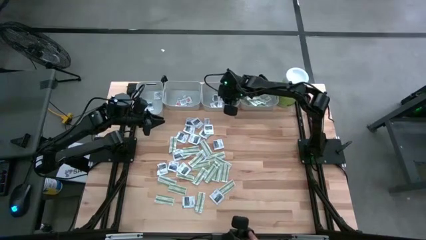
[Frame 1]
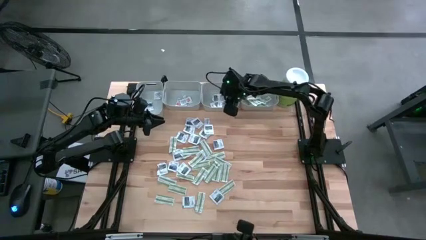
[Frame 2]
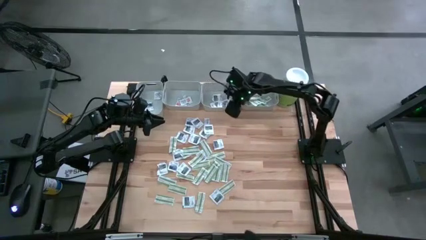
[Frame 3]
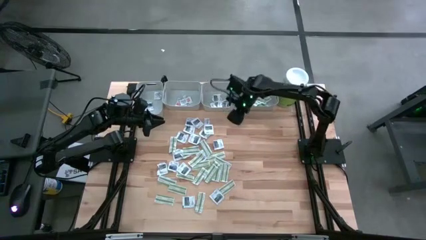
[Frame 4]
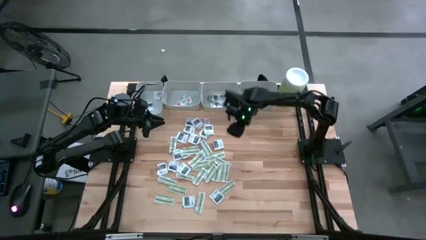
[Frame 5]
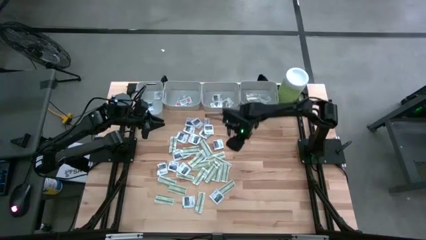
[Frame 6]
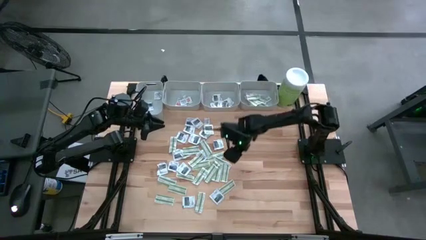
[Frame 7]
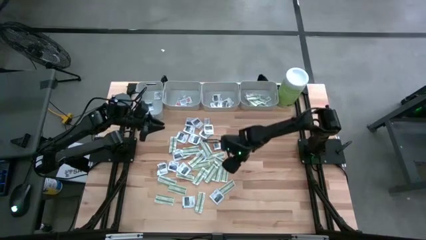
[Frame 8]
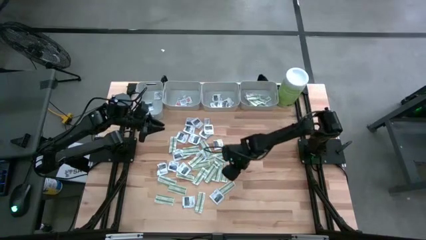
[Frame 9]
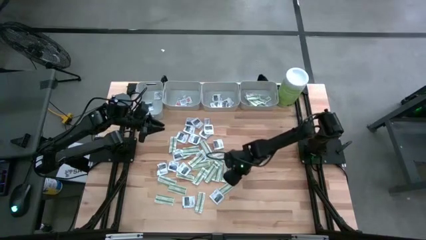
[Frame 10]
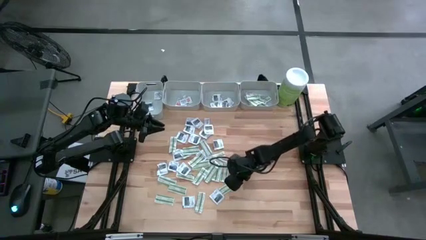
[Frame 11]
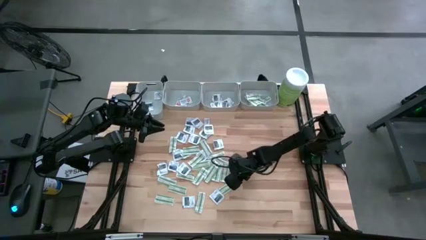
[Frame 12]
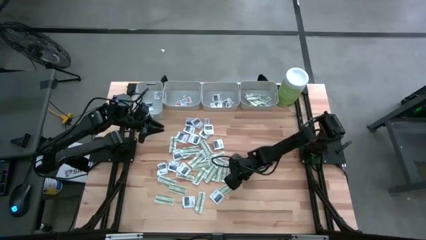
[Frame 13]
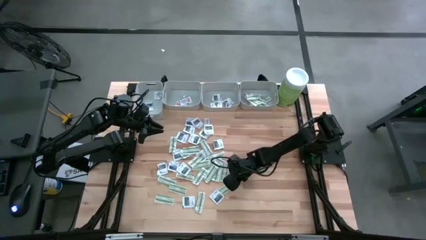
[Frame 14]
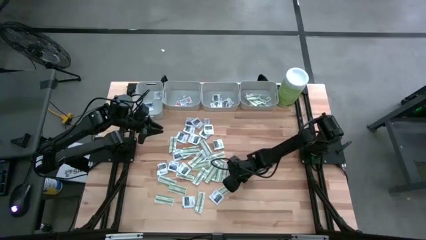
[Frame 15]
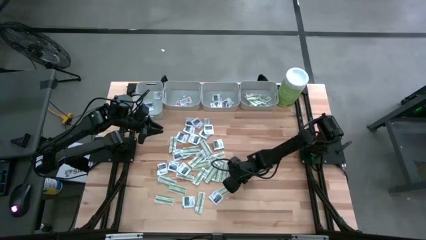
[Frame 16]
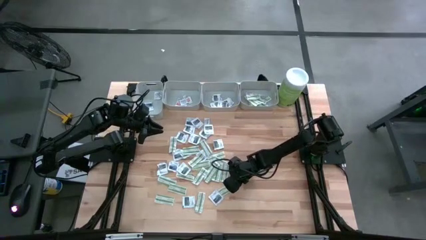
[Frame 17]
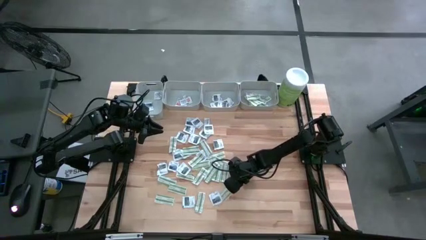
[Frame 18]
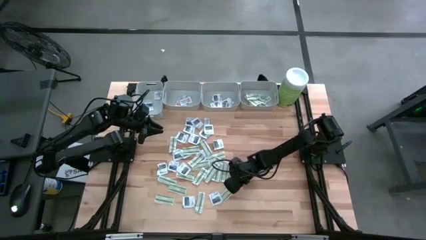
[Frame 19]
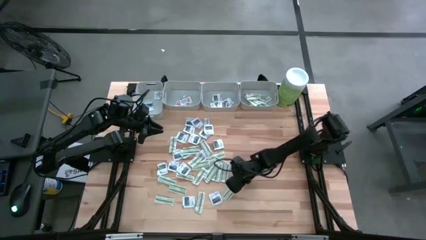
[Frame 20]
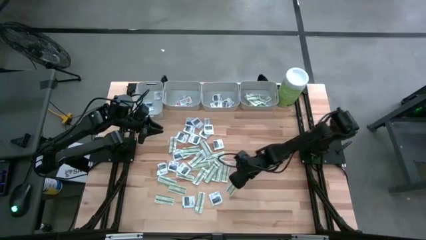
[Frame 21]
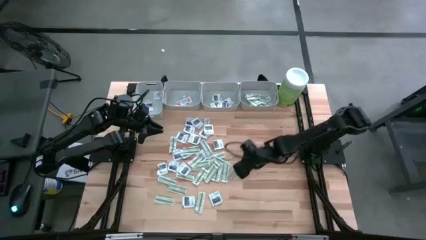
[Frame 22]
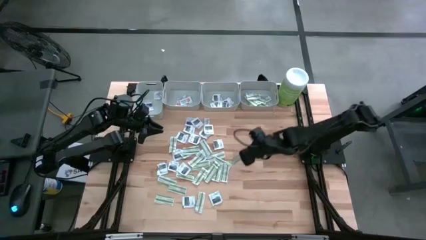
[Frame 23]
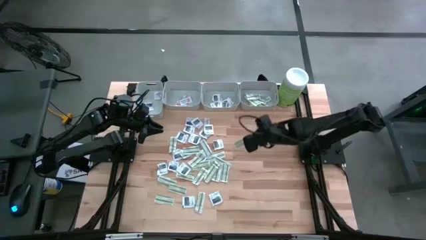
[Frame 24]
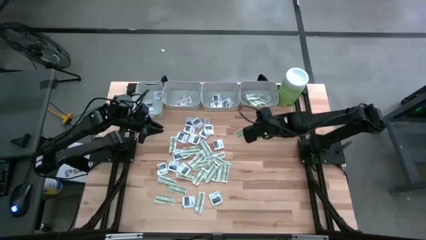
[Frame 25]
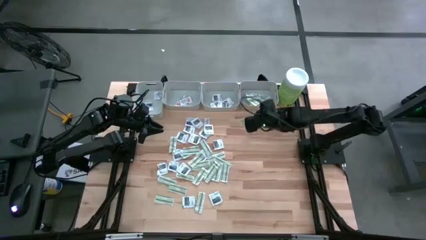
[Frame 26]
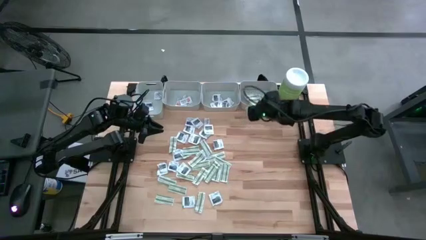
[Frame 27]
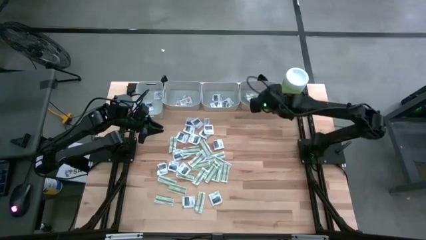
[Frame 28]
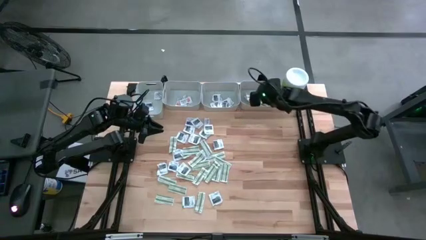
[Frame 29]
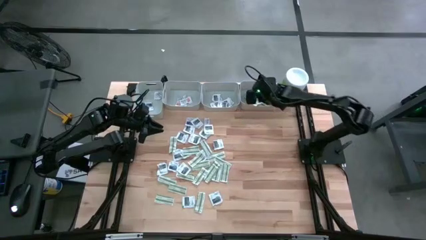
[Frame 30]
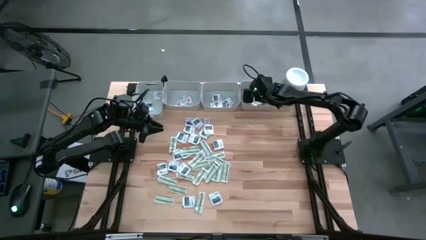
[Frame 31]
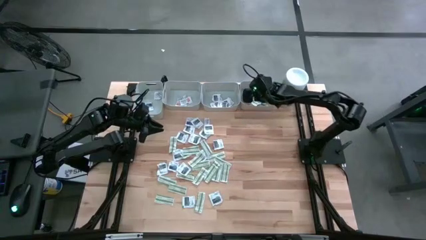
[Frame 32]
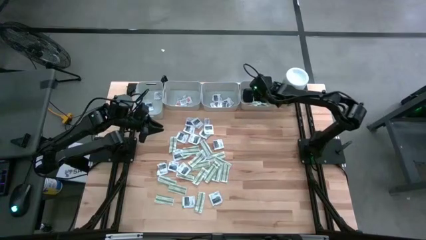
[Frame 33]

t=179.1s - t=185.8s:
Task: Pick & Place First Aid Supplies
Put the green bandage into the right gray bin

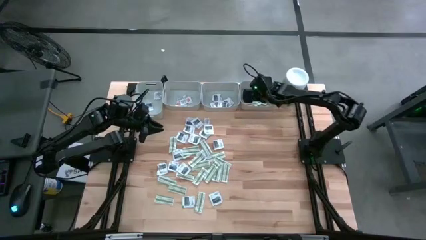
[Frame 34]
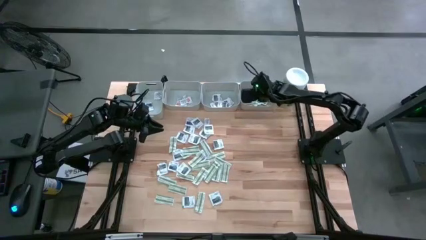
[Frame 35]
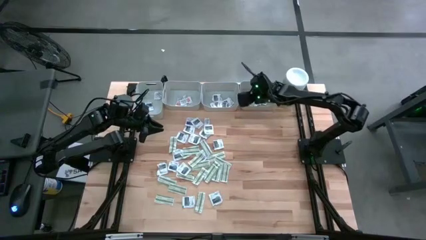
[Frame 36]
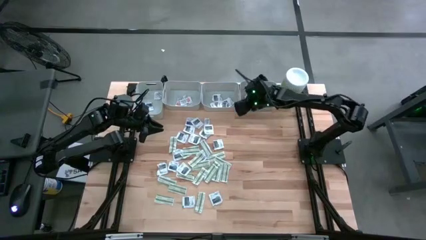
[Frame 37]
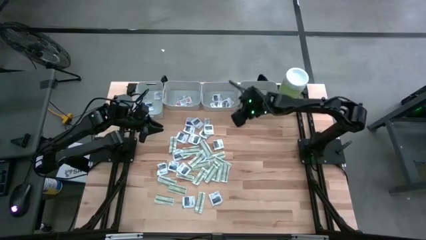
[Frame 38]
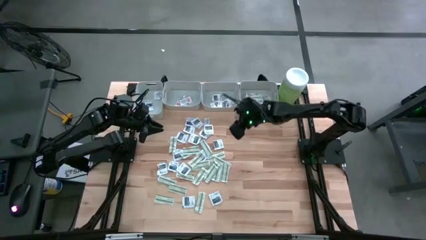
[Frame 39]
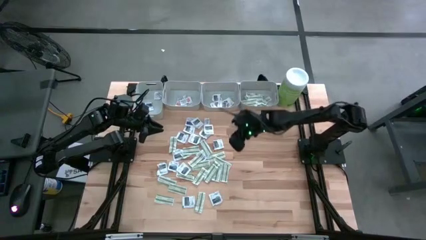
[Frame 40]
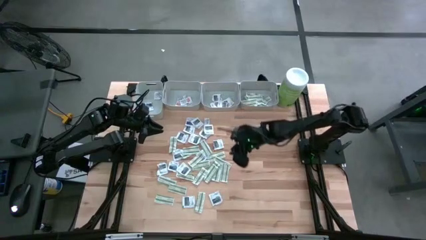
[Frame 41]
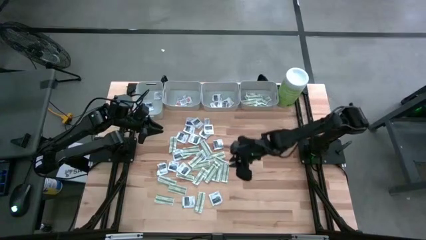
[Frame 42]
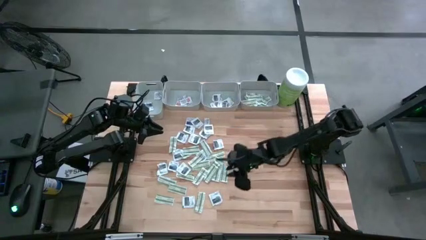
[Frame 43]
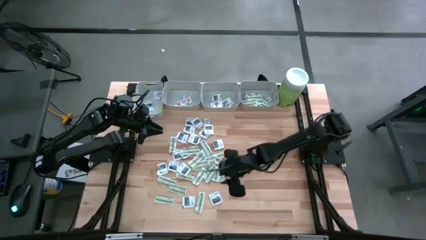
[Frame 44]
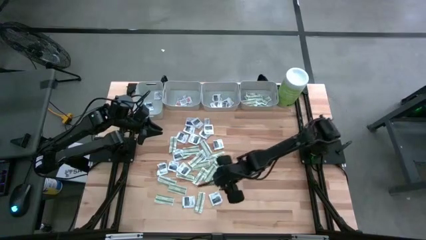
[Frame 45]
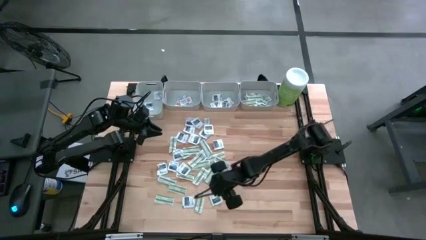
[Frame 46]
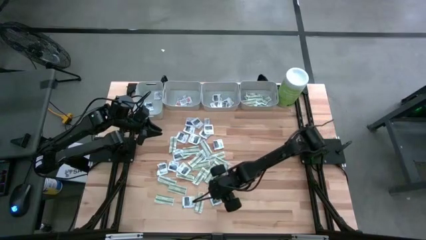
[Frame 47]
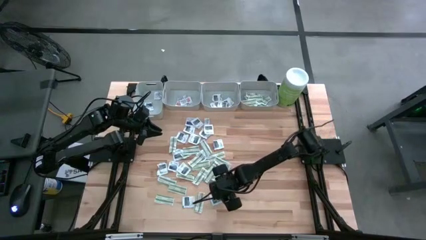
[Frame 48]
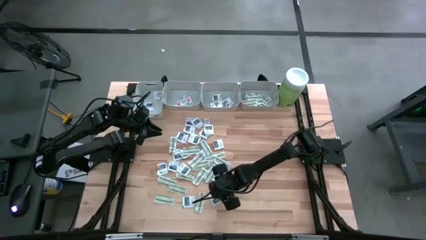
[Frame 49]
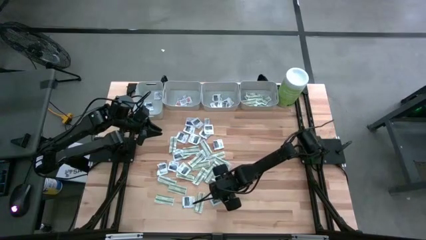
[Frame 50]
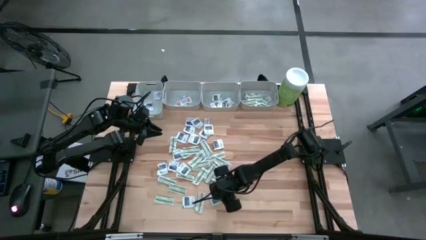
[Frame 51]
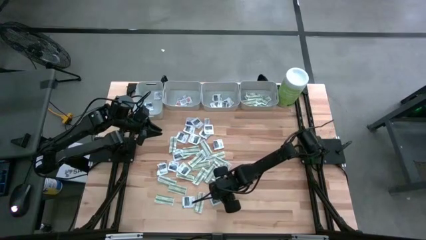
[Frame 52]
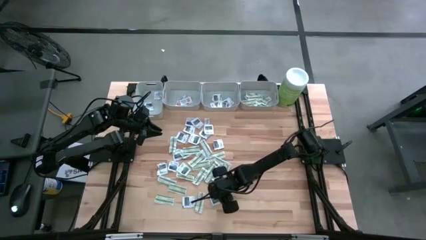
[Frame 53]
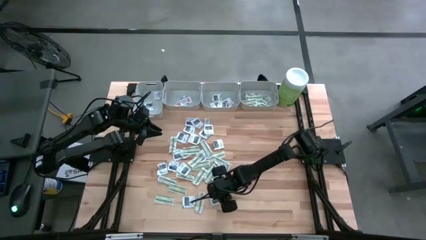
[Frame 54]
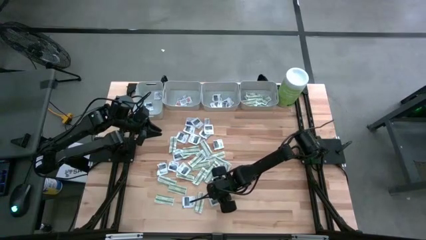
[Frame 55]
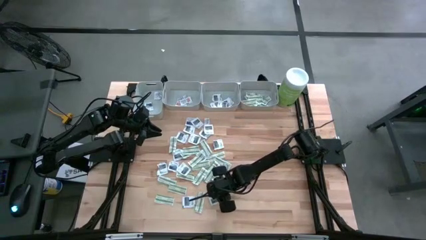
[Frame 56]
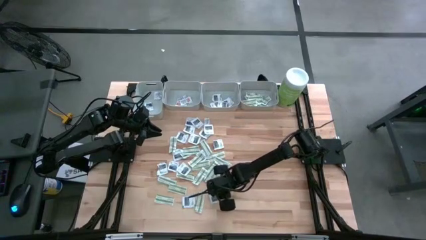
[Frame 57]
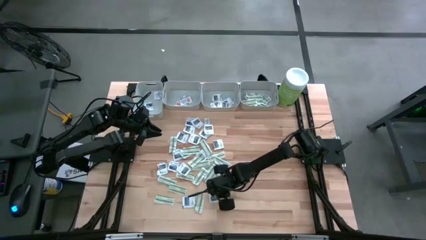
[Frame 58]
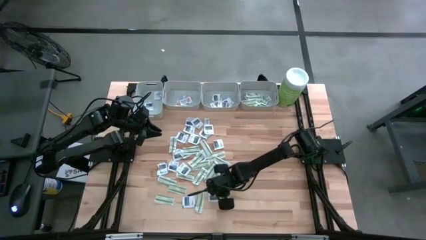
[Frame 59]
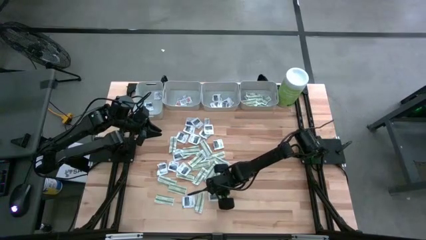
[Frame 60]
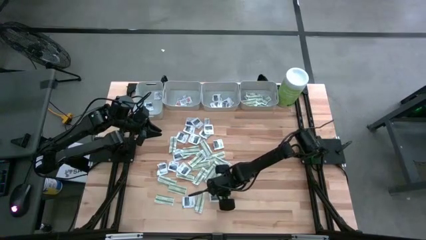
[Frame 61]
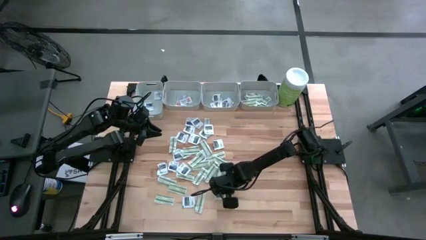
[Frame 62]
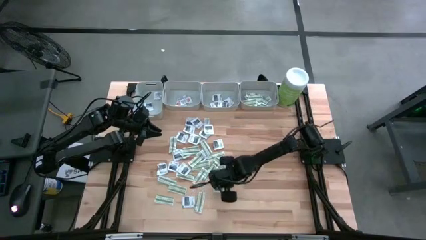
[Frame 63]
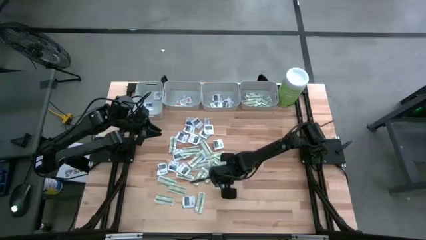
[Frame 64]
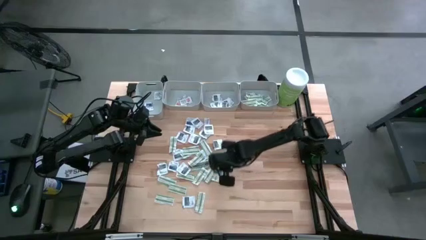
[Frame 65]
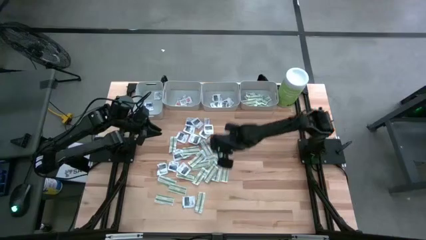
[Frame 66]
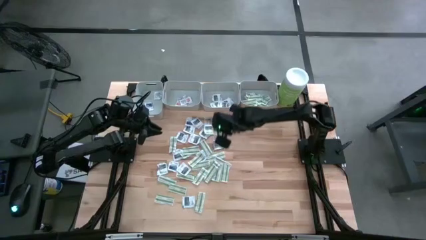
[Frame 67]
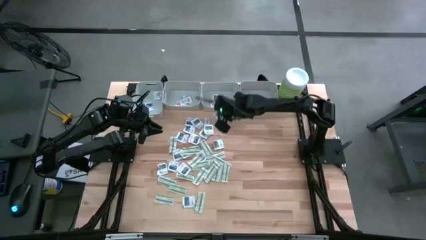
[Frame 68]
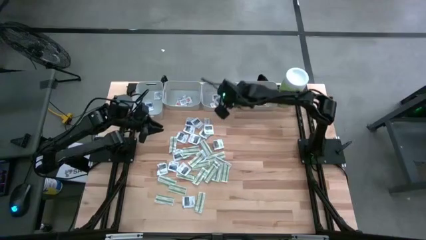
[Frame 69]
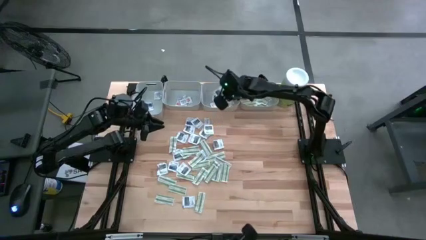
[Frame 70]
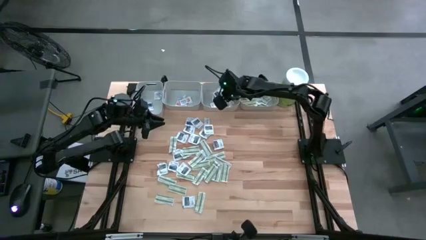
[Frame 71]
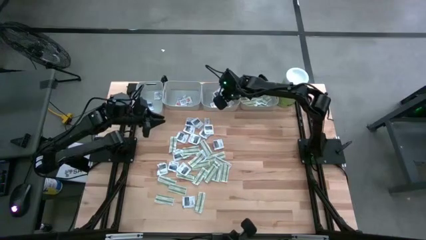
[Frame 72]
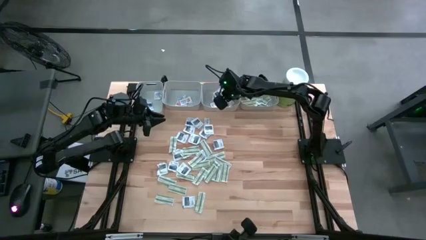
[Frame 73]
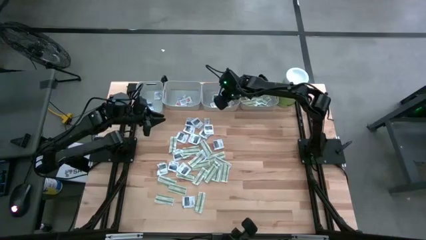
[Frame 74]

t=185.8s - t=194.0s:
Put the gray towelette pack into the middle right gray bin

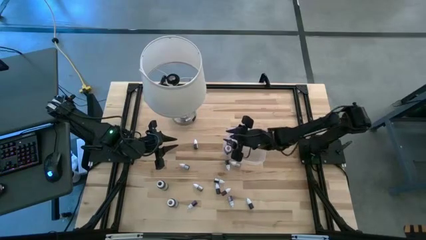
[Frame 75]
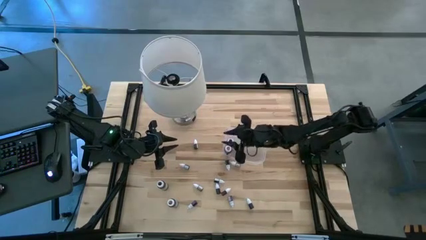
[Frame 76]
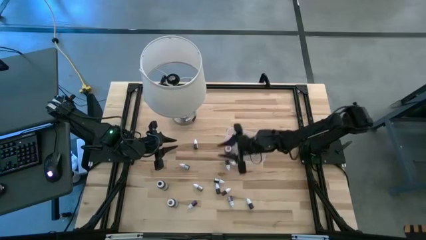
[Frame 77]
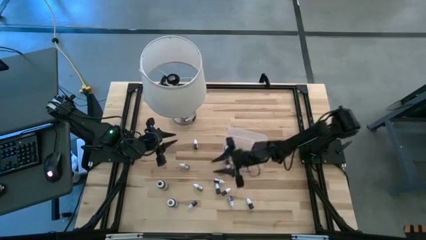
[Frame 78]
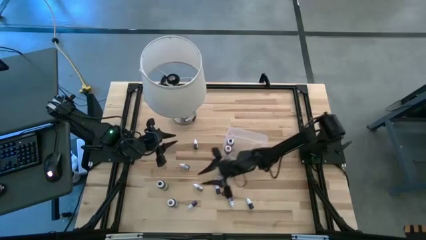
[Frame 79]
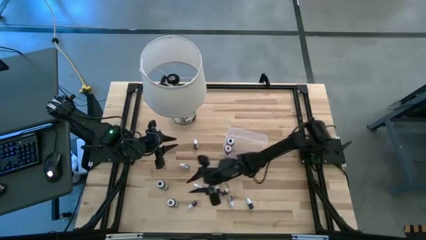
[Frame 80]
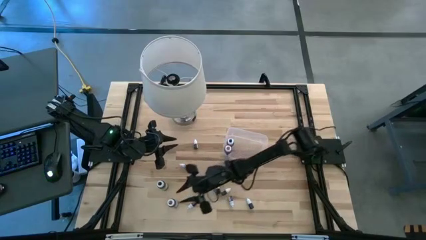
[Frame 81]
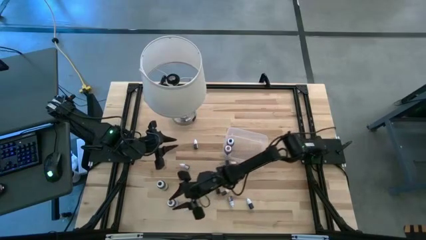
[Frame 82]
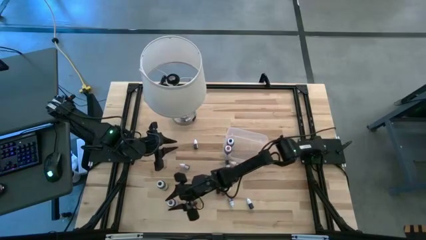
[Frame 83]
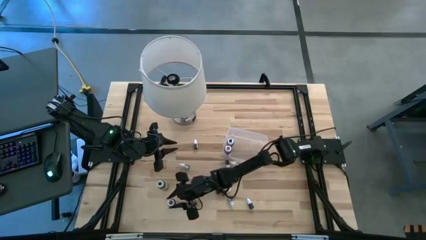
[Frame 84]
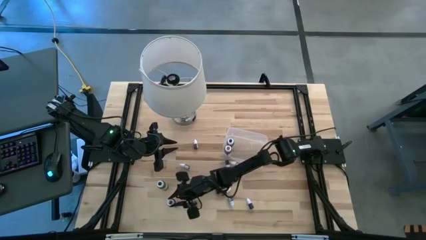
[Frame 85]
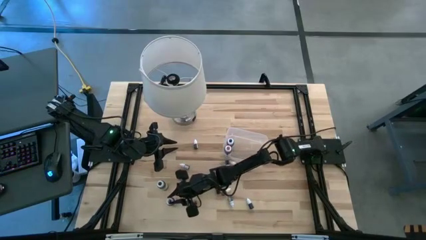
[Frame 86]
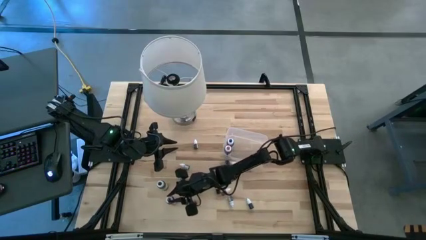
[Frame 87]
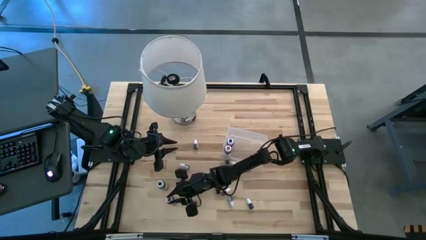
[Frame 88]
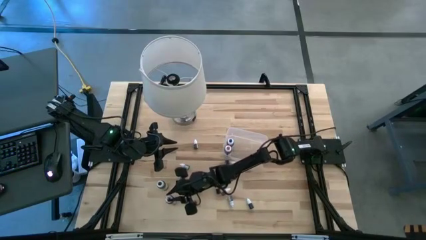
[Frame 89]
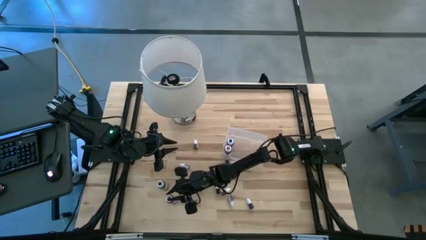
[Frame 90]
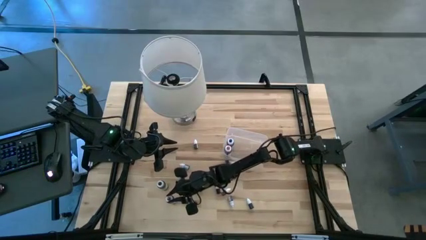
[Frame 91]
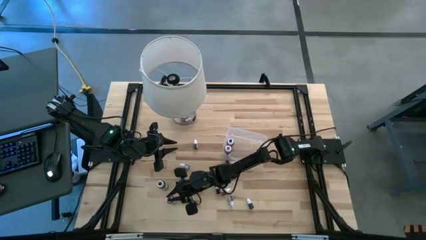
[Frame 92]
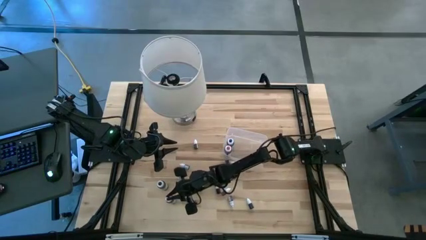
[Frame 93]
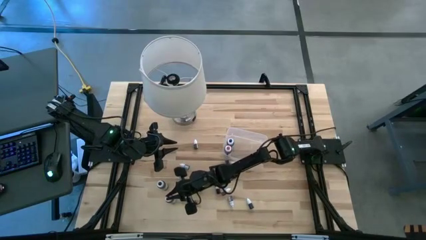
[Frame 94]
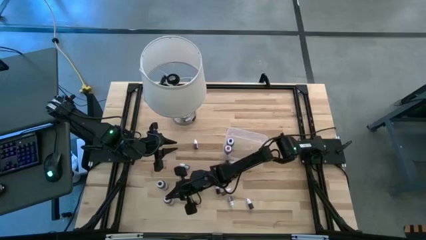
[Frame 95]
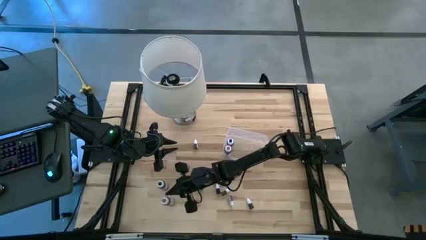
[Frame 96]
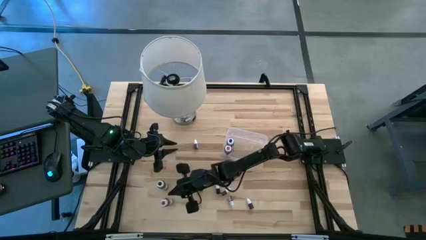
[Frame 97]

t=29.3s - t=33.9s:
Task: Pick & Place food coloring
Put the large purple food coloring bottle into the transparent bin
